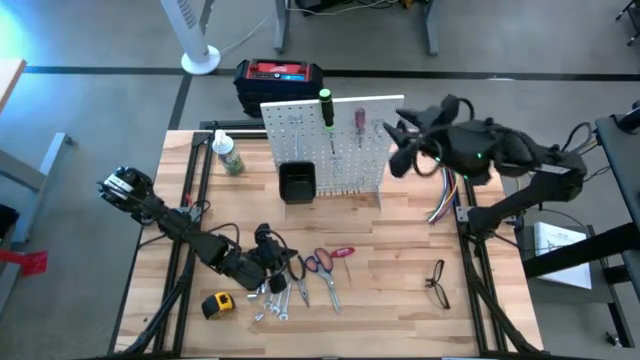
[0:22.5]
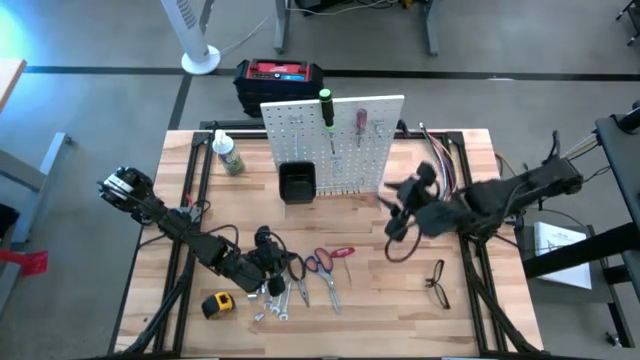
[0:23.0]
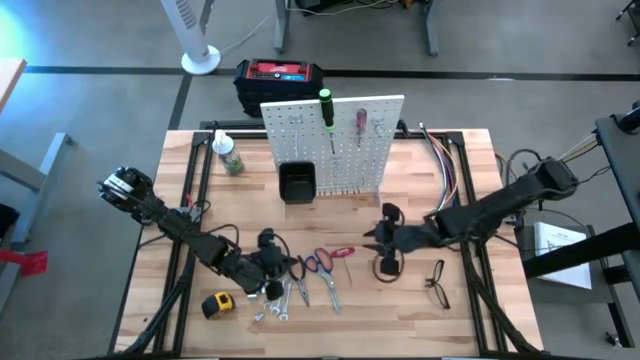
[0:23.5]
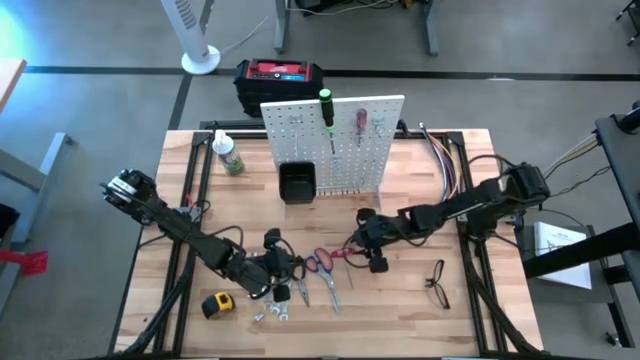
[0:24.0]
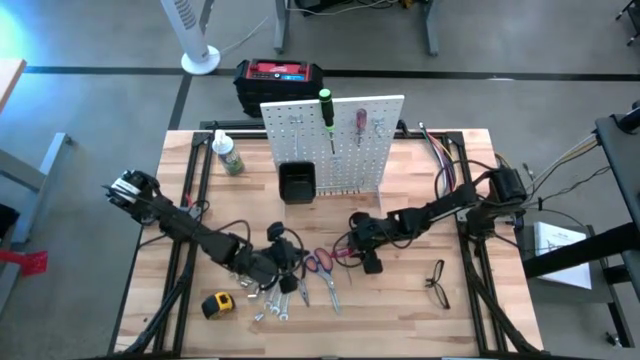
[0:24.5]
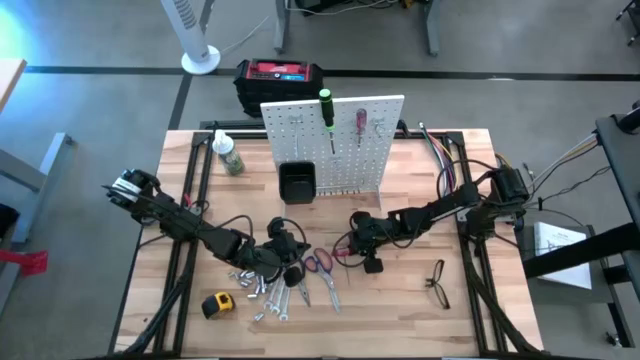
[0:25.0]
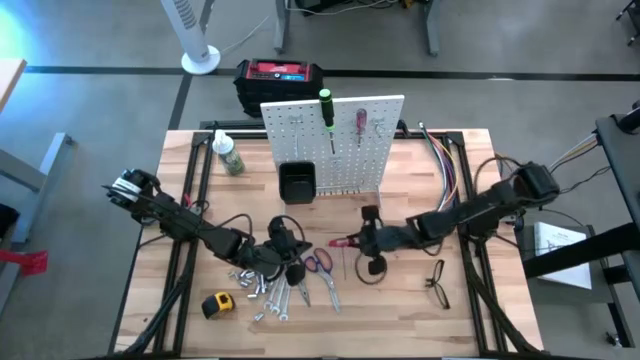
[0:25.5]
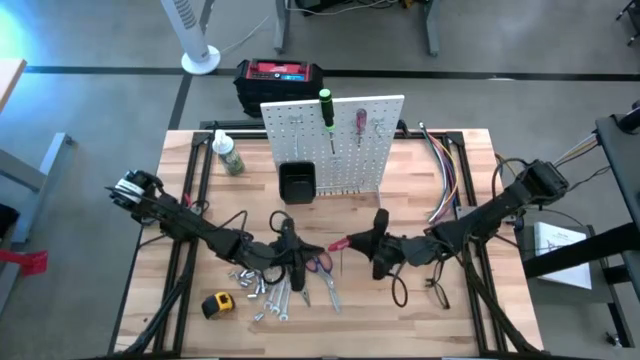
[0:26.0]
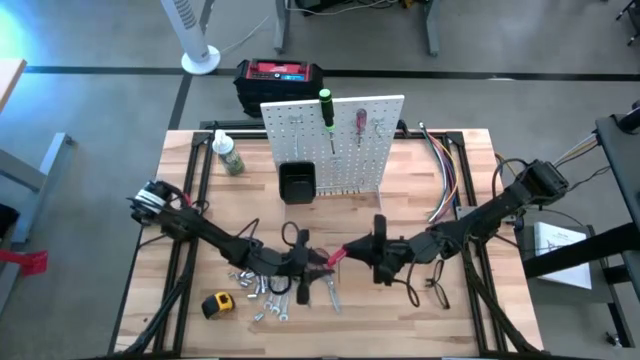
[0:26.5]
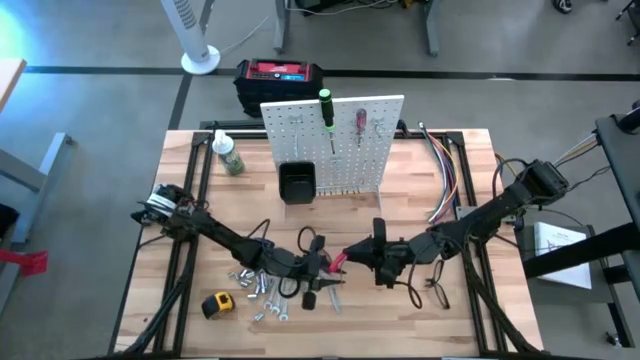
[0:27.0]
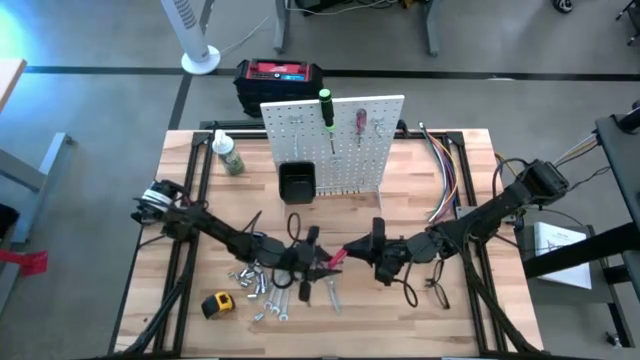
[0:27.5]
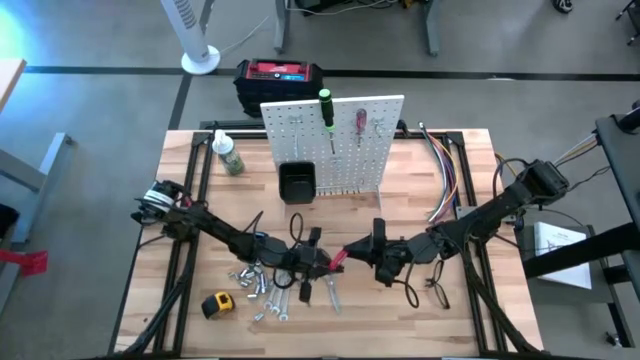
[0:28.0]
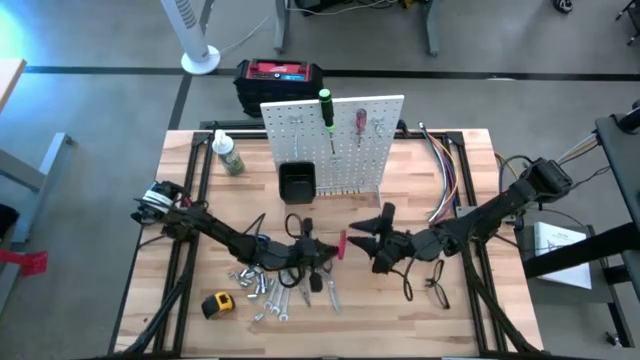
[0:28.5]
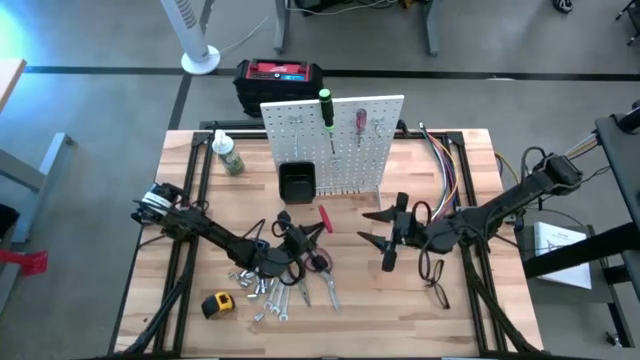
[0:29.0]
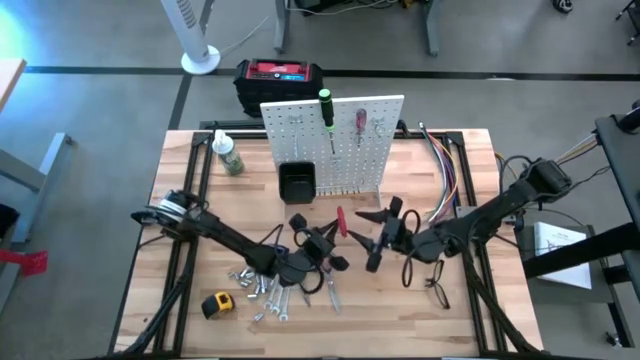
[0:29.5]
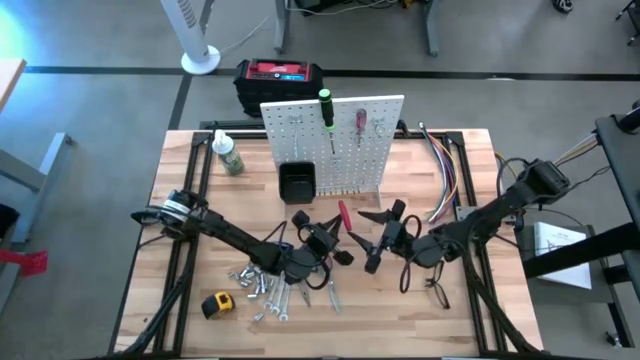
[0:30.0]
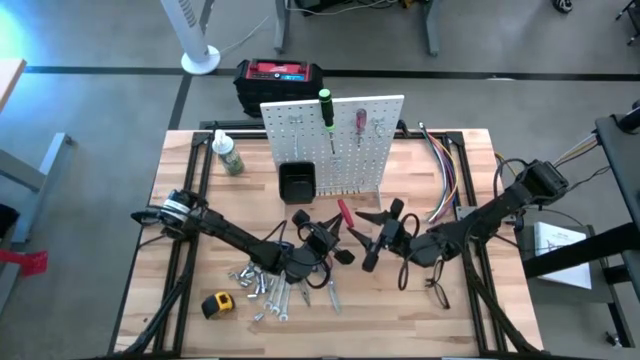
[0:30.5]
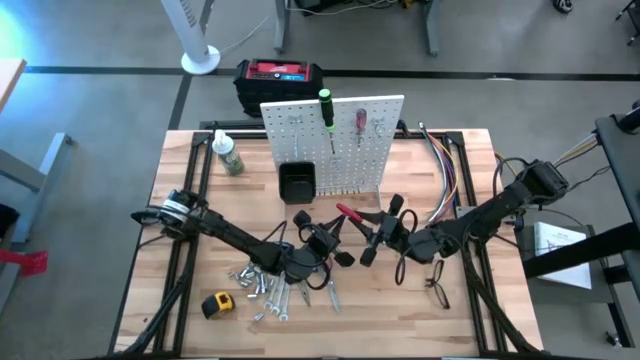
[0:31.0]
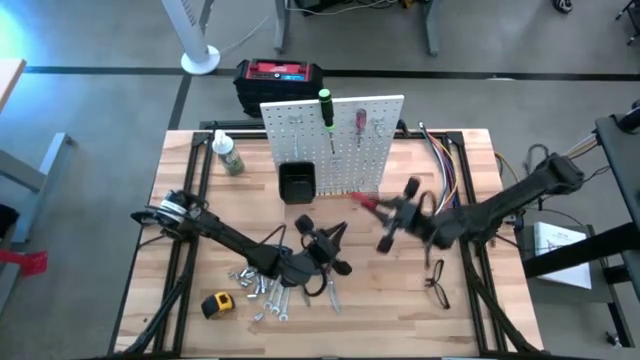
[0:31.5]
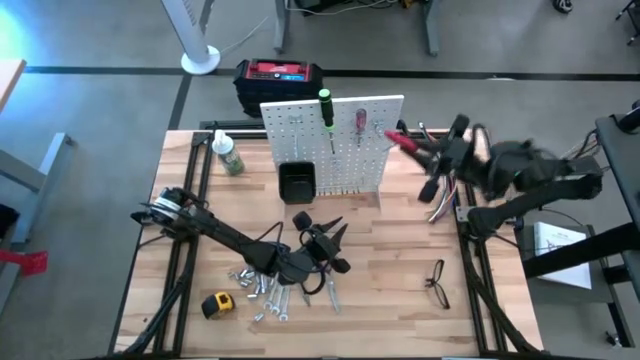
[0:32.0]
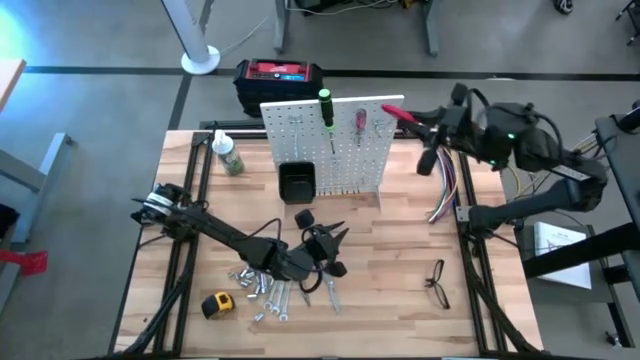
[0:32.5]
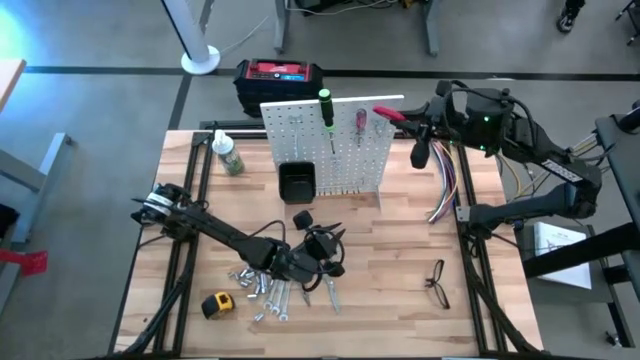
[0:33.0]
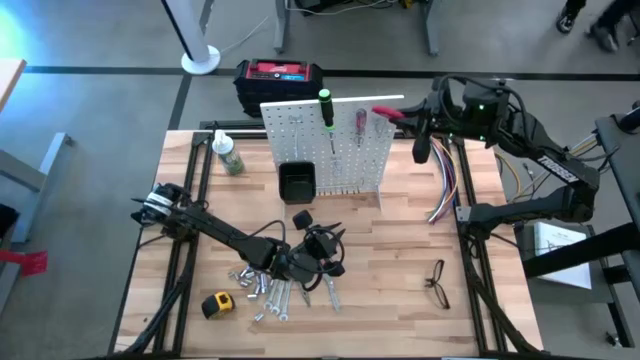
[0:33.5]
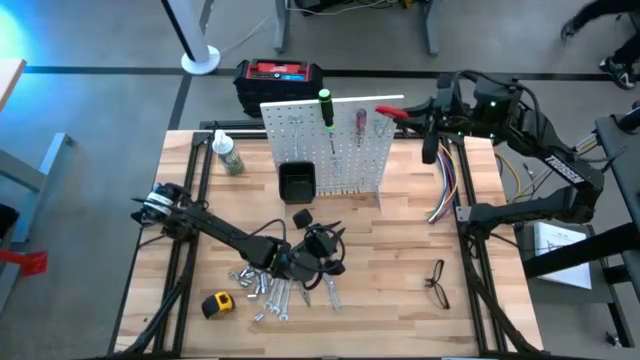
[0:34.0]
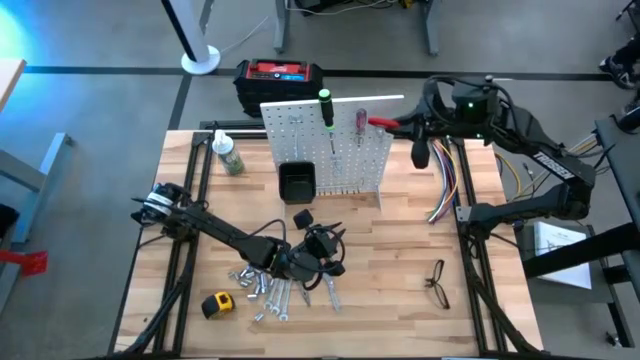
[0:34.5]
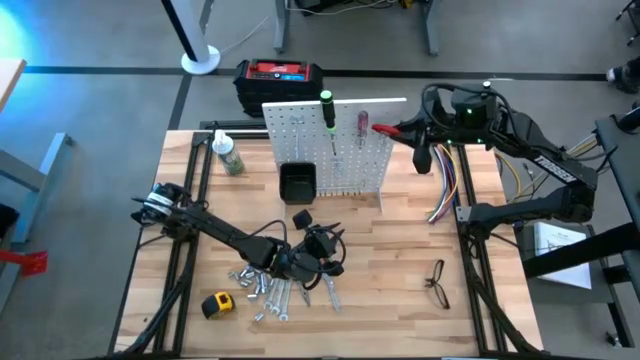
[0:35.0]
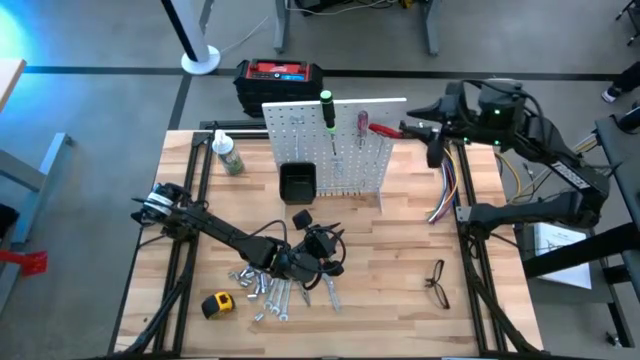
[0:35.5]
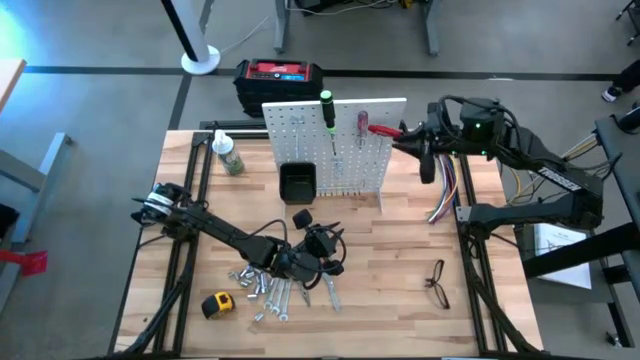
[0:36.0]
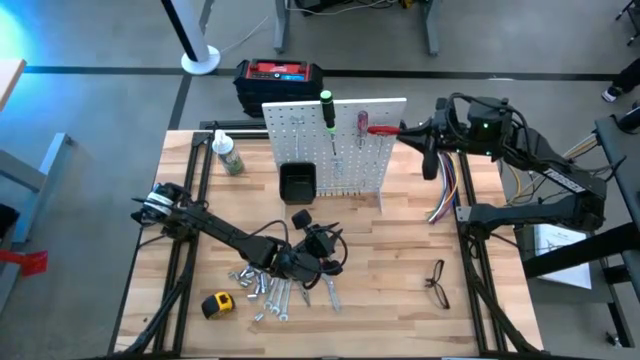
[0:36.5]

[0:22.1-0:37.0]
Task: Hang tools onto peg board
Hang the red allen wrench on the pegboard

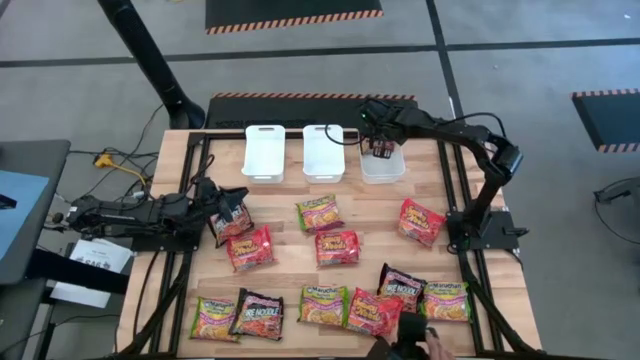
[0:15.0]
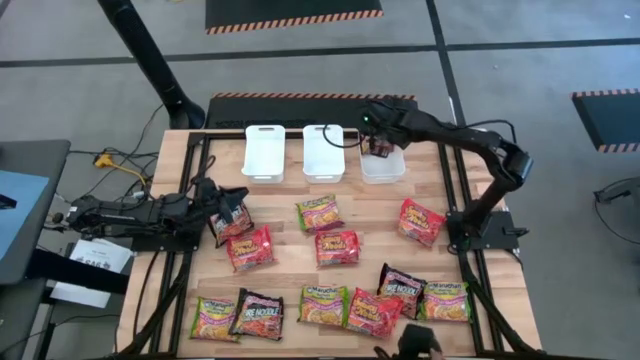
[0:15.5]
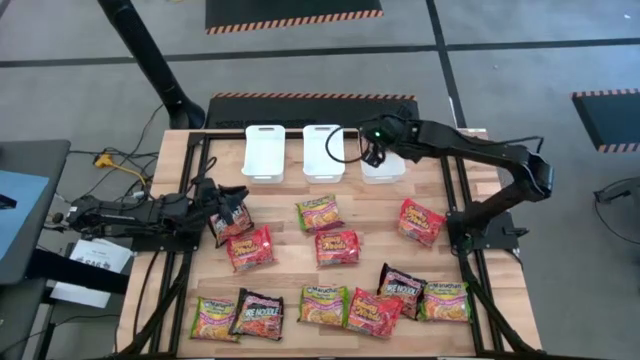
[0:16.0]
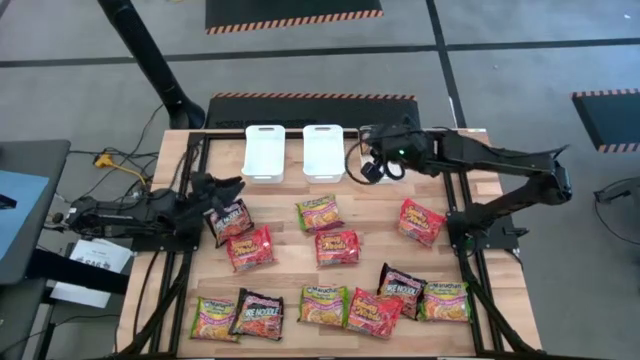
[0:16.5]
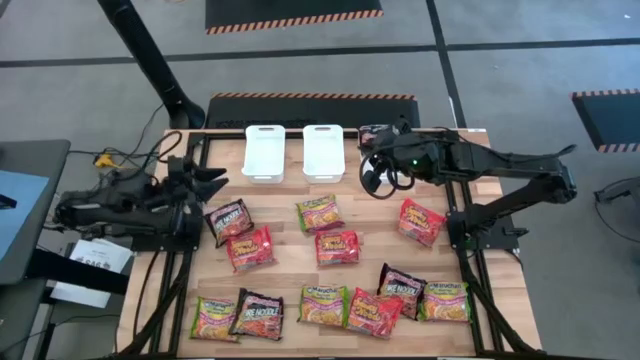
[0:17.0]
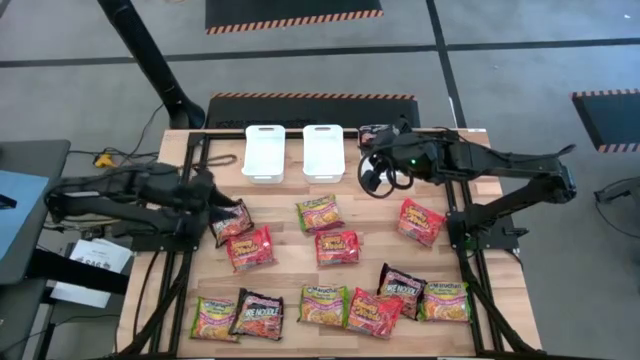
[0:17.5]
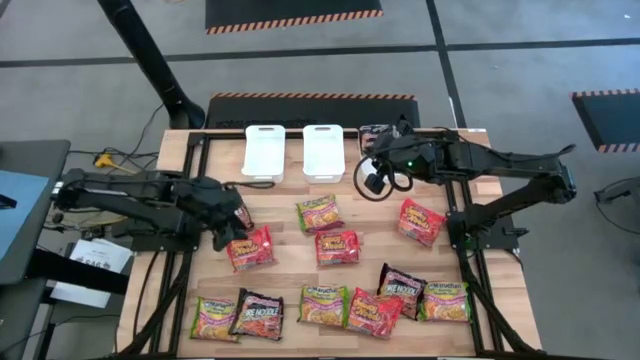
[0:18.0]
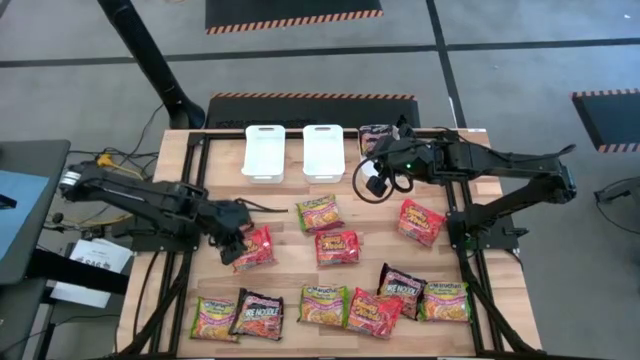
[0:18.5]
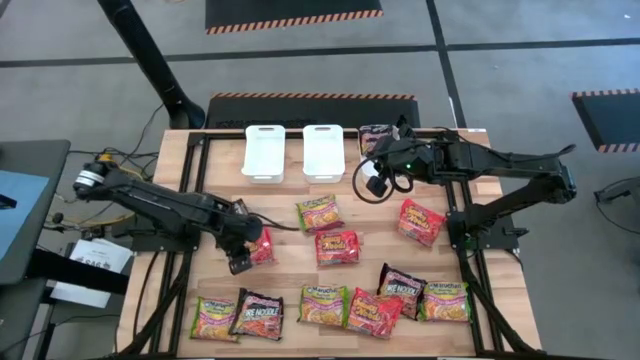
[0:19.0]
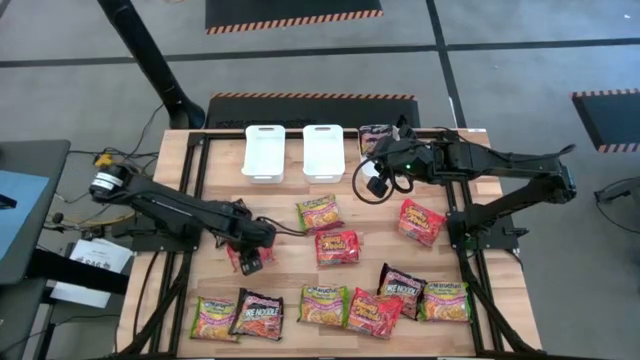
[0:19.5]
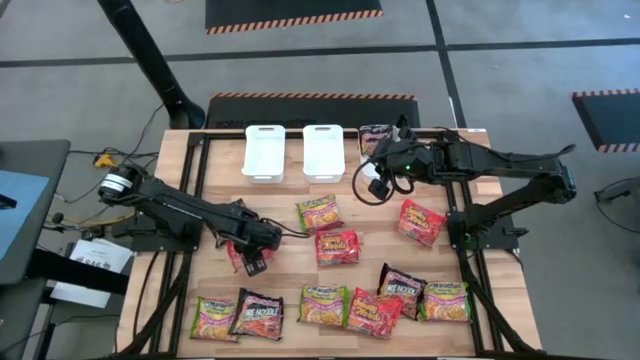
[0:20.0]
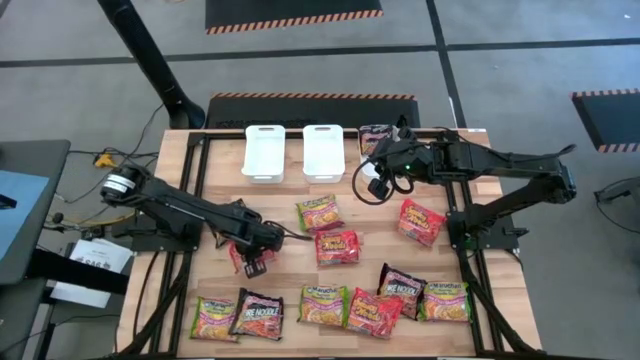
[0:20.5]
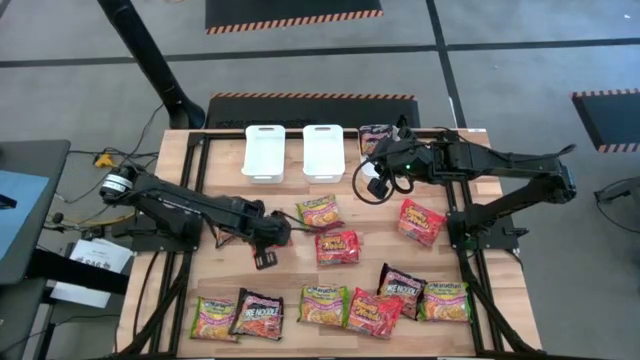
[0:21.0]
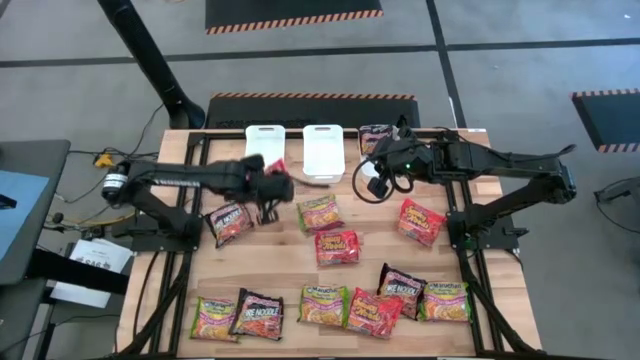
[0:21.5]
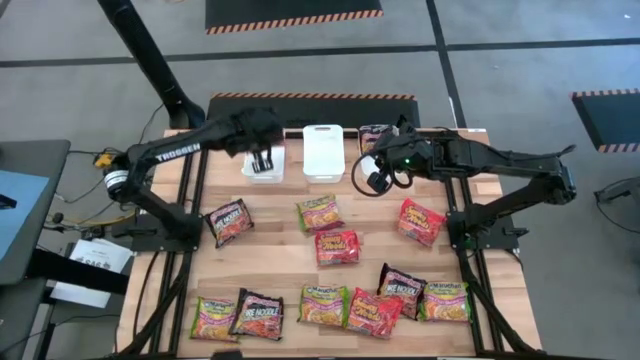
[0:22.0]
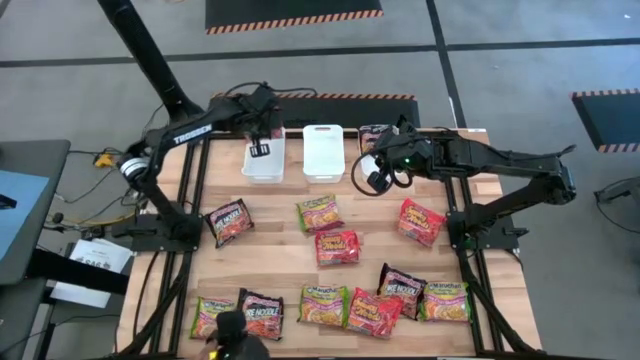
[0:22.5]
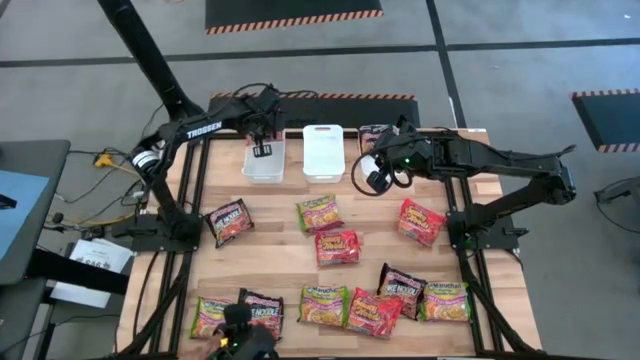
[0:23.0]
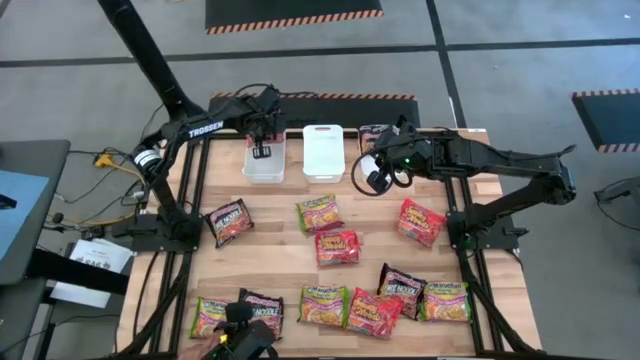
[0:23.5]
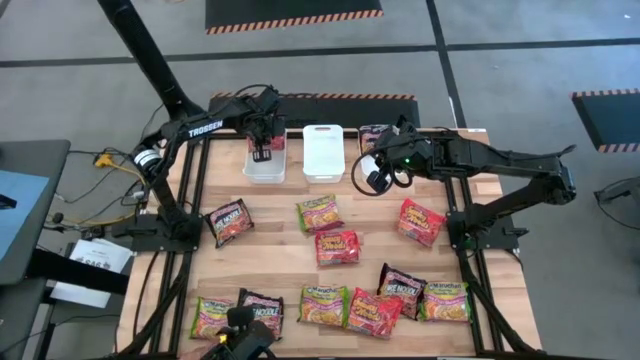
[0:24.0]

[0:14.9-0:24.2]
Task: Sort Maruchan noodles
Put the orange noodle pack into the left white bin
